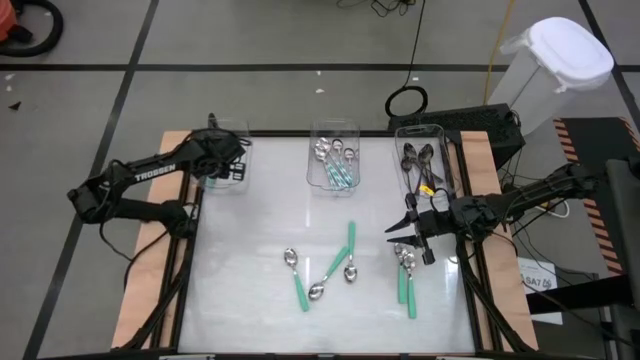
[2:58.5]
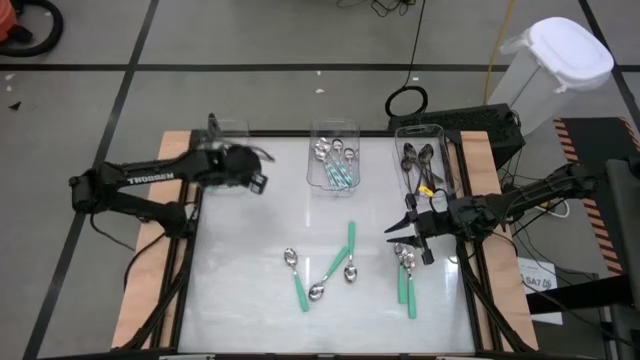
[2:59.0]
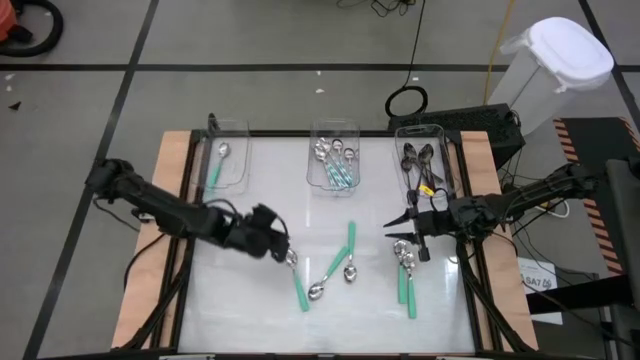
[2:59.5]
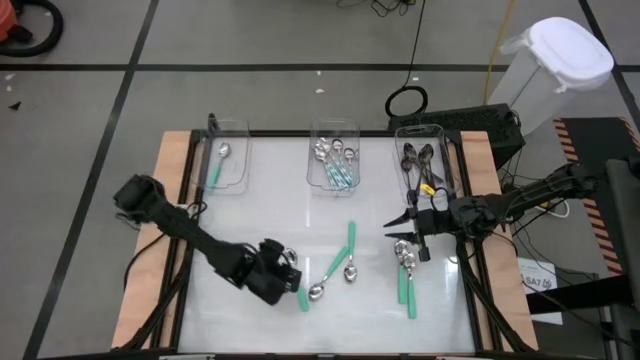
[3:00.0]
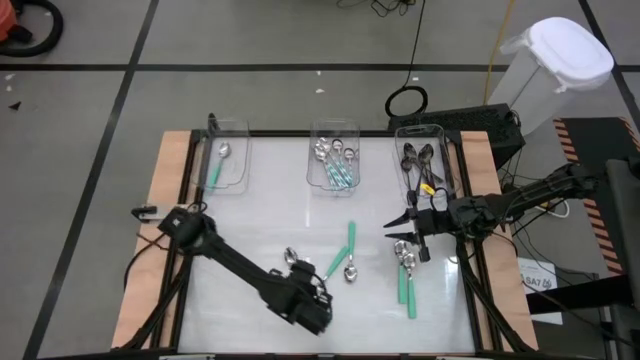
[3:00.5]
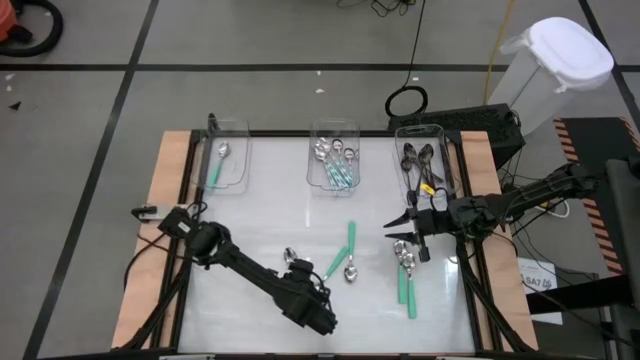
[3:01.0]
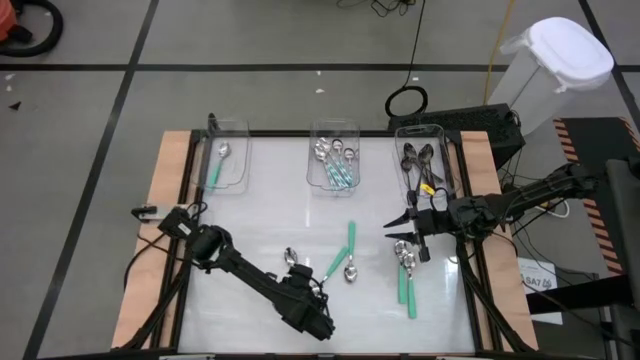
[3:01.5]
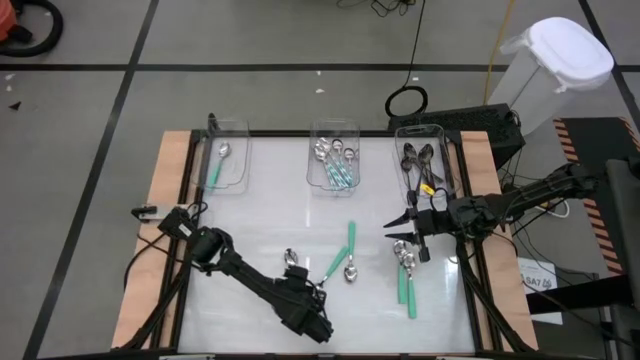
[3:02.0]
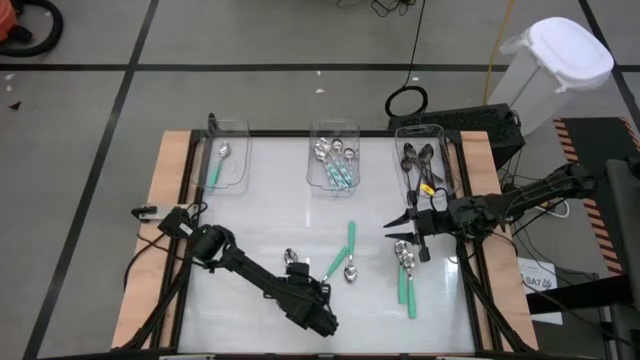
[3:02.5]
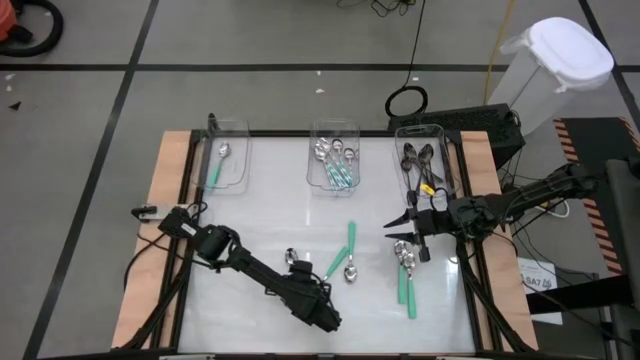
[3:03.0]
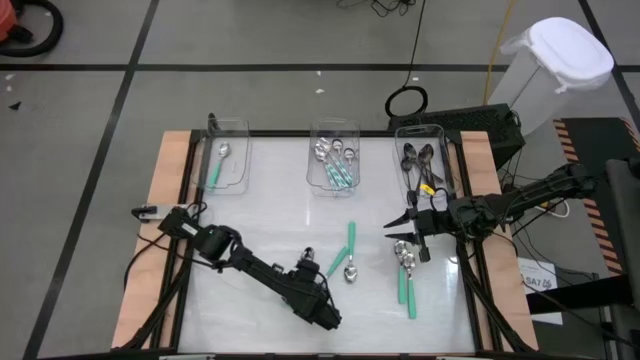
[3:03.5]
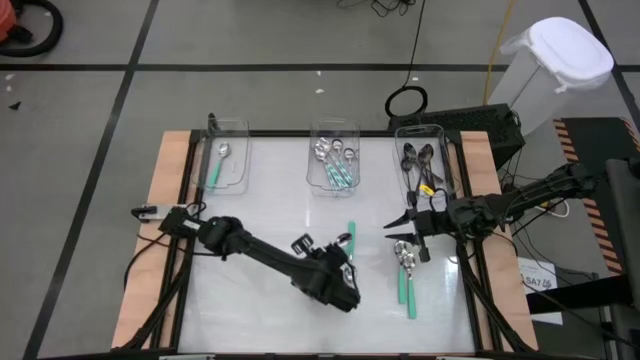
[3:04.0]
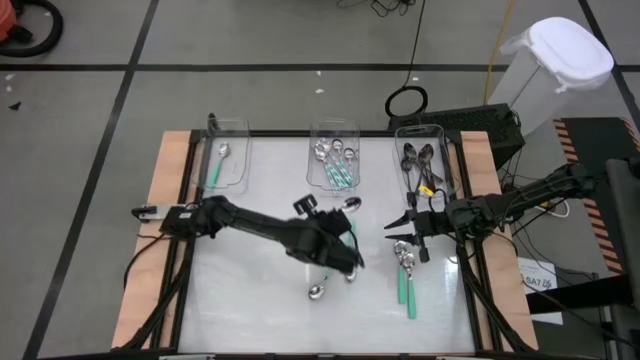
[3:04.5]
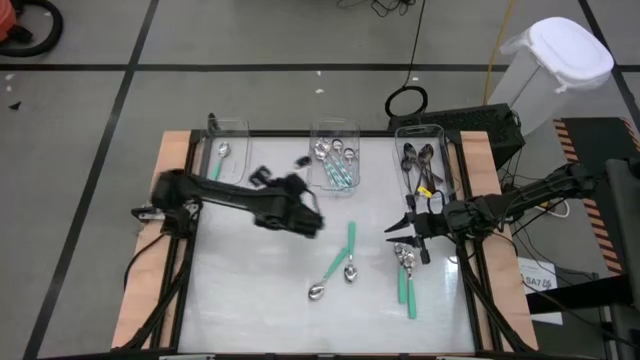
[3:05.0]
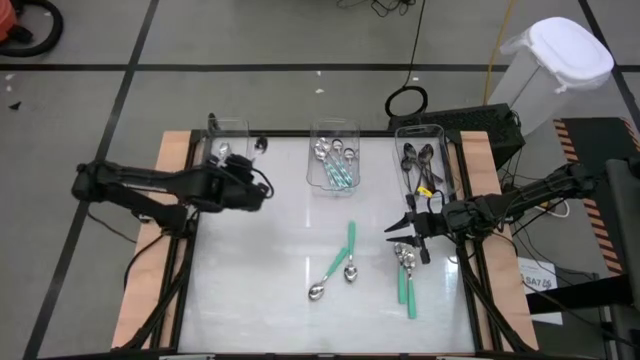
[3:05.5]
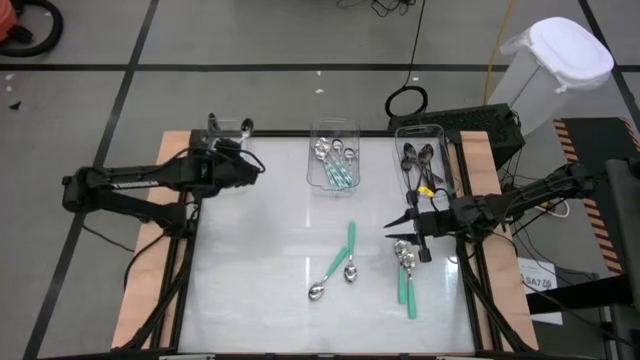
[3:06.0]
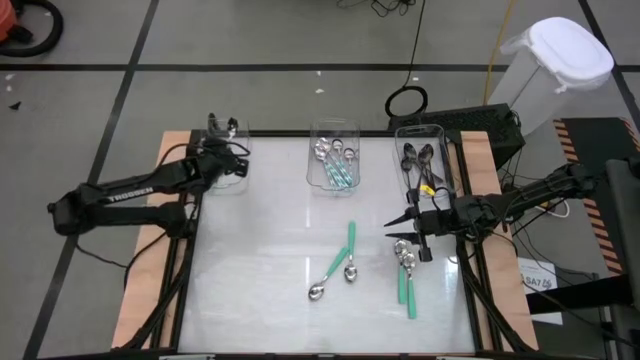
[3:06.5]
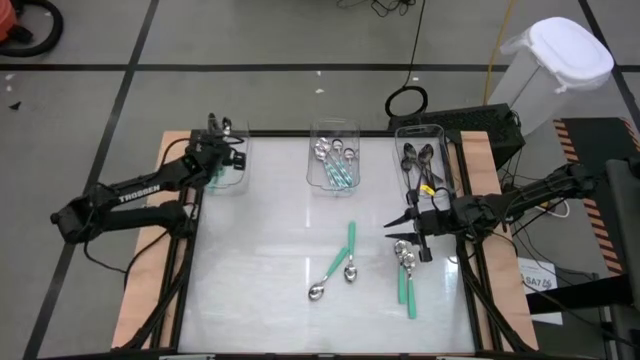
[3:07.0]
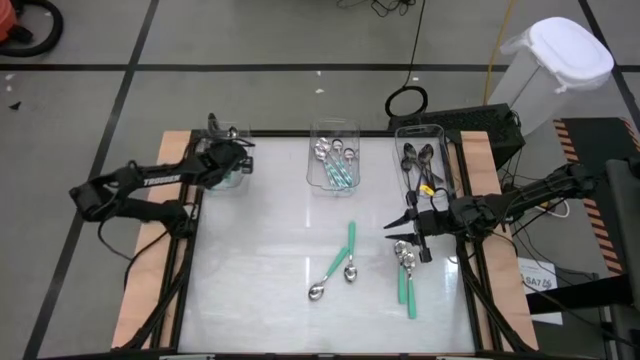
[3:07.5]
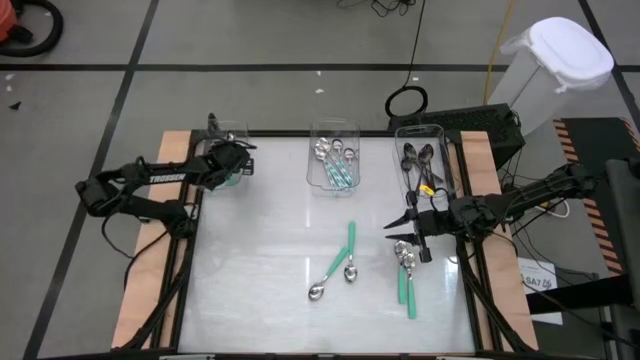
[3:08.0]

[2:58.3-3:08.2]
Task: Sort silverware by color (type)
Put the green spoon into the left transparent bin

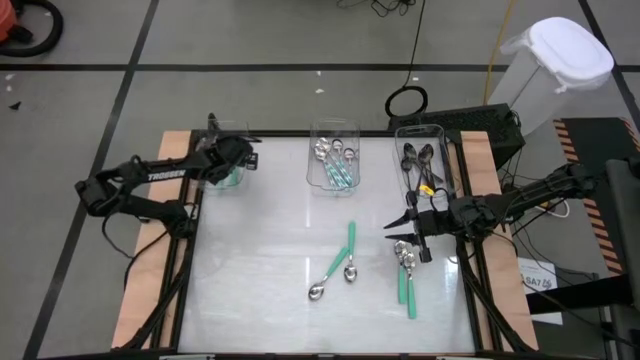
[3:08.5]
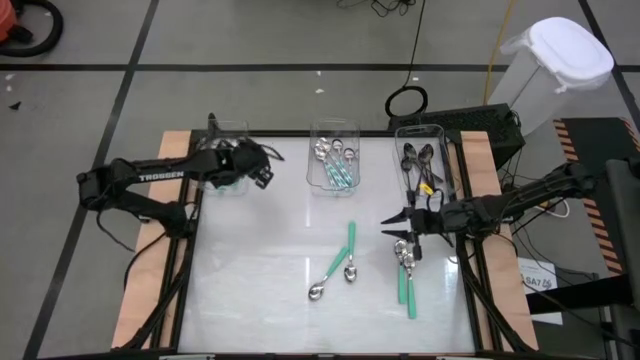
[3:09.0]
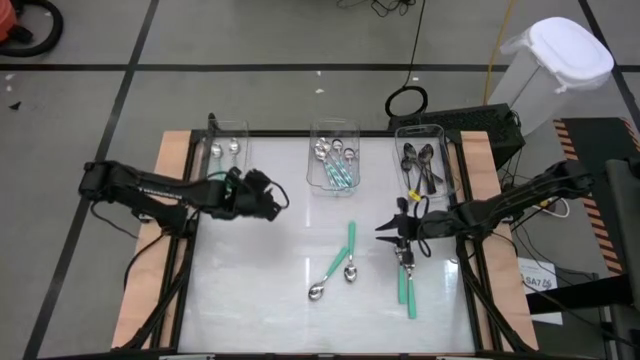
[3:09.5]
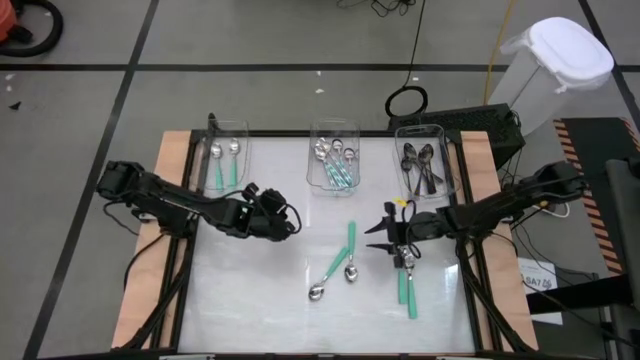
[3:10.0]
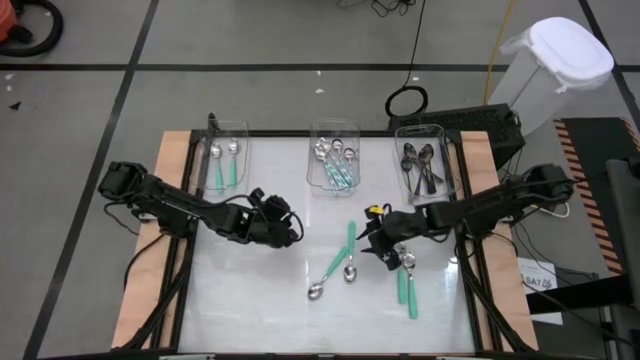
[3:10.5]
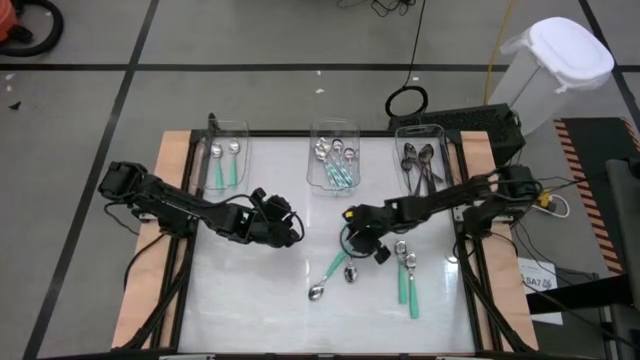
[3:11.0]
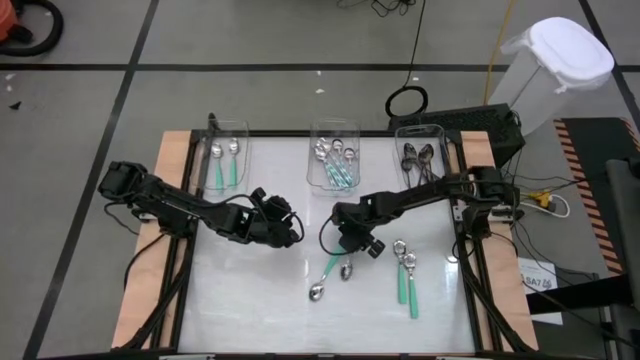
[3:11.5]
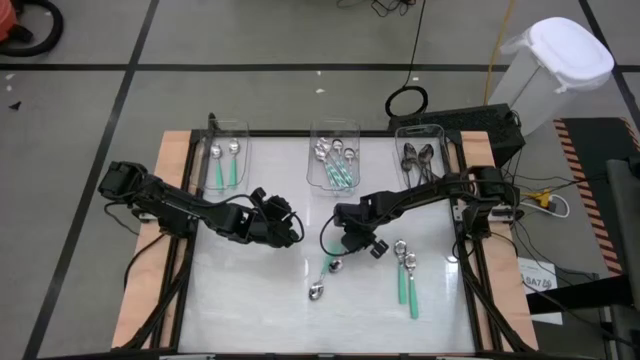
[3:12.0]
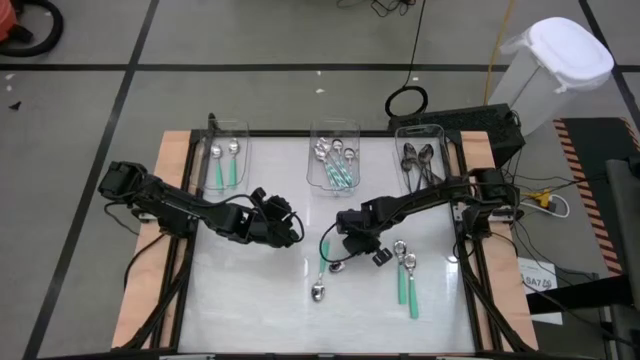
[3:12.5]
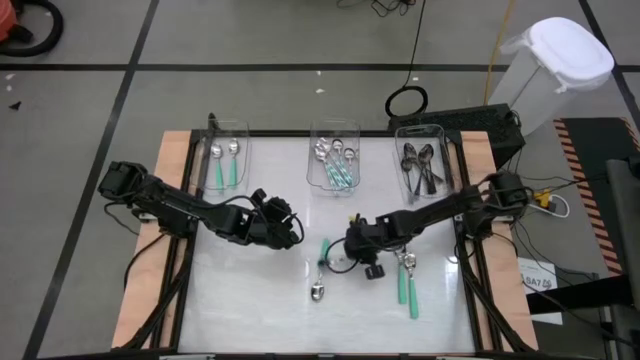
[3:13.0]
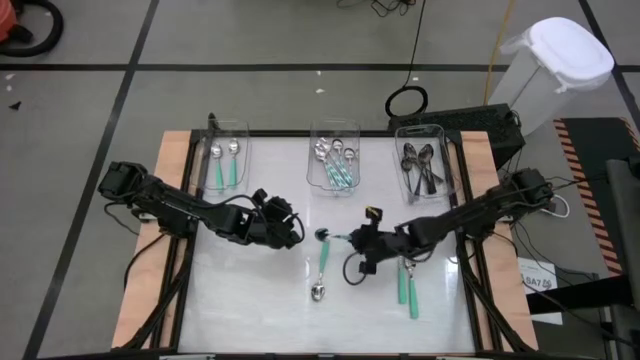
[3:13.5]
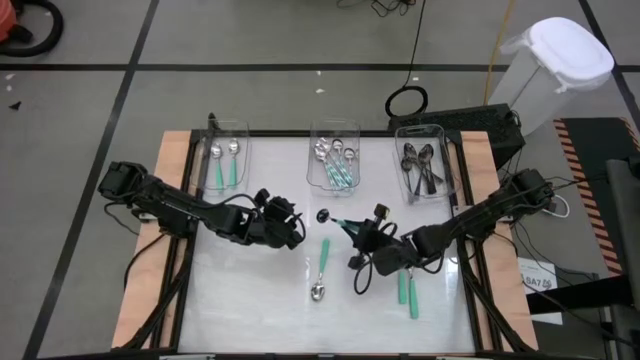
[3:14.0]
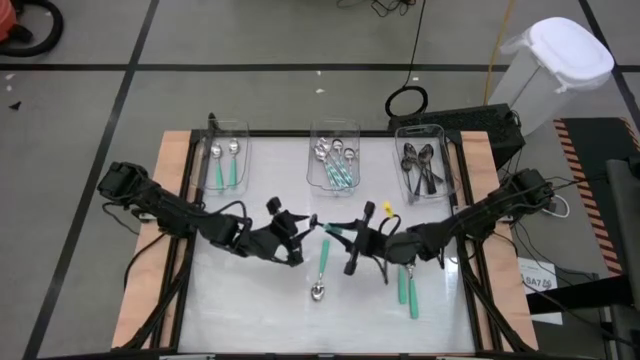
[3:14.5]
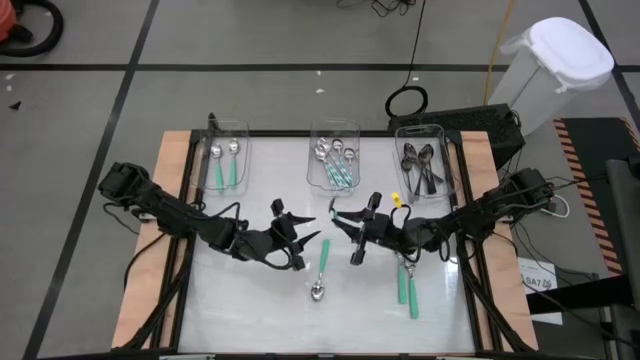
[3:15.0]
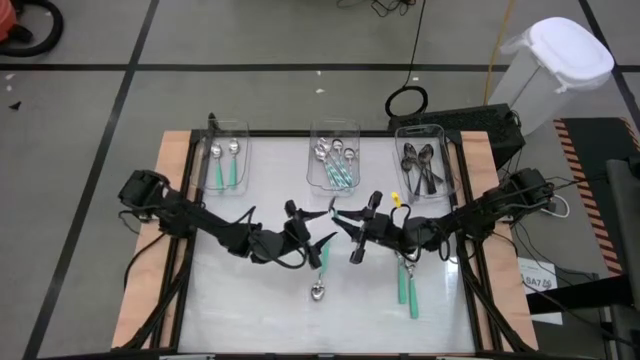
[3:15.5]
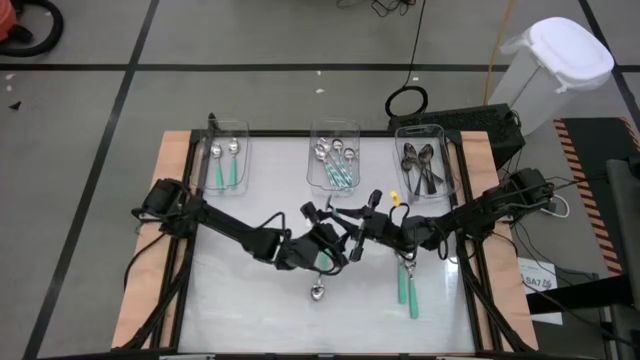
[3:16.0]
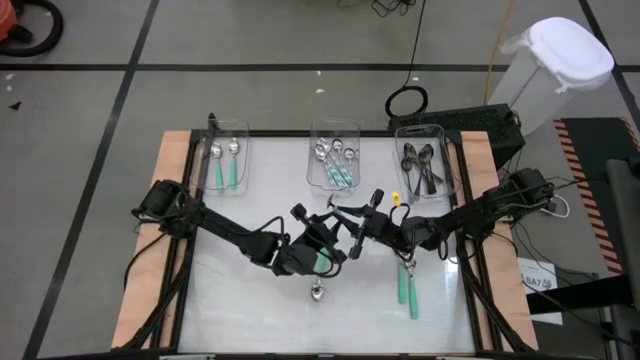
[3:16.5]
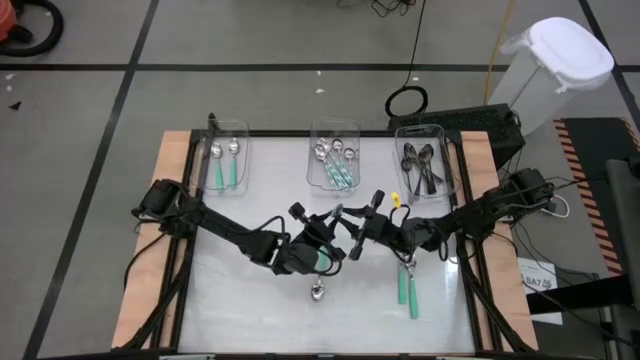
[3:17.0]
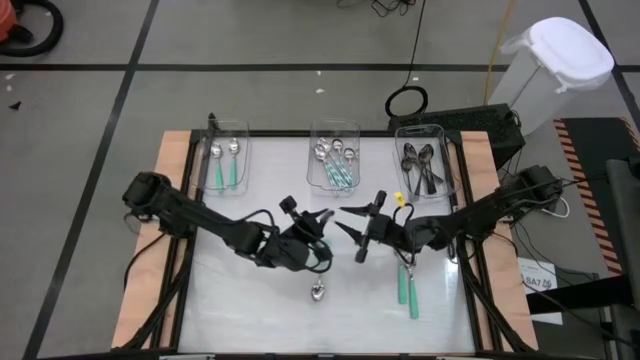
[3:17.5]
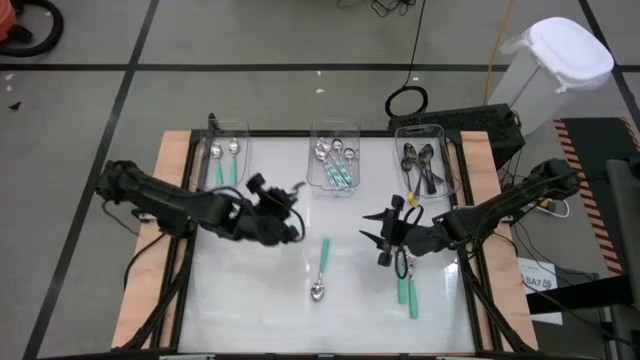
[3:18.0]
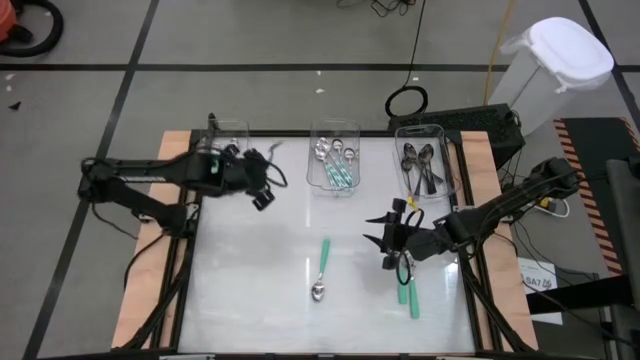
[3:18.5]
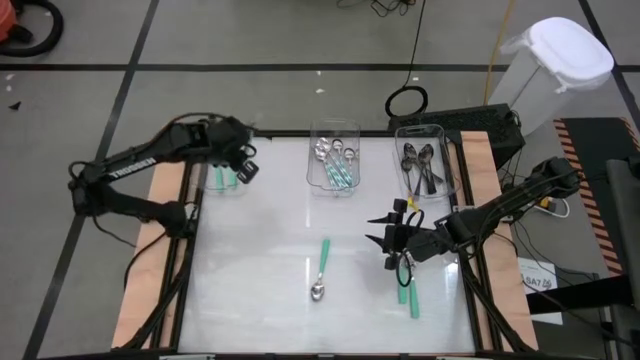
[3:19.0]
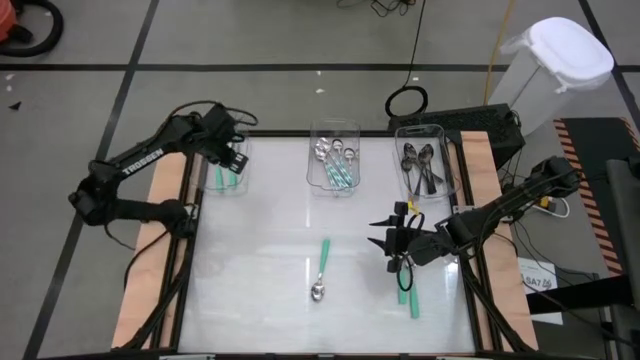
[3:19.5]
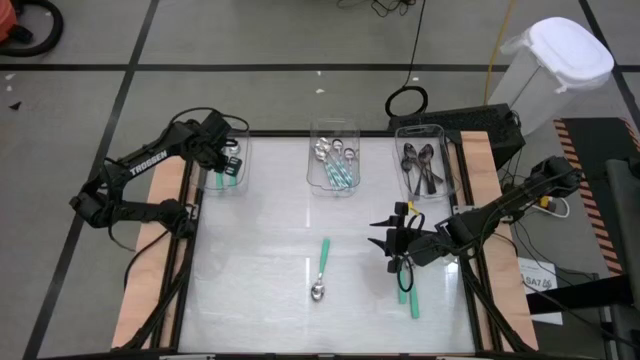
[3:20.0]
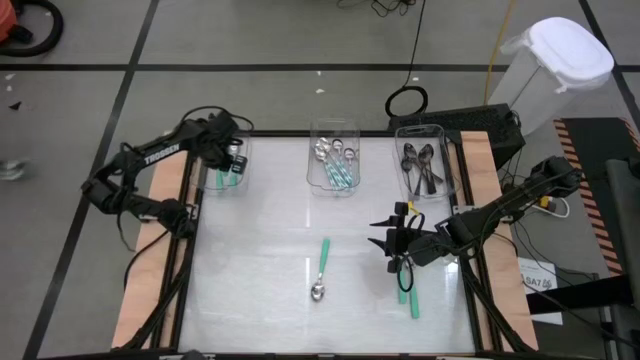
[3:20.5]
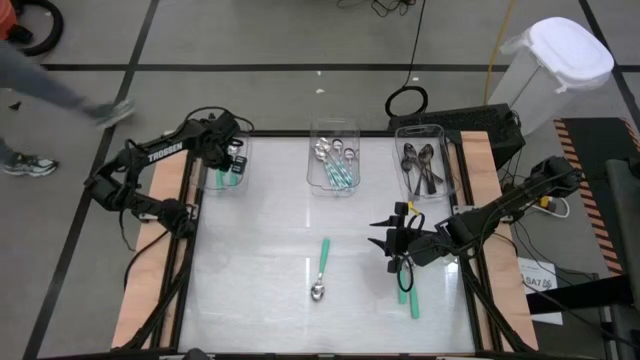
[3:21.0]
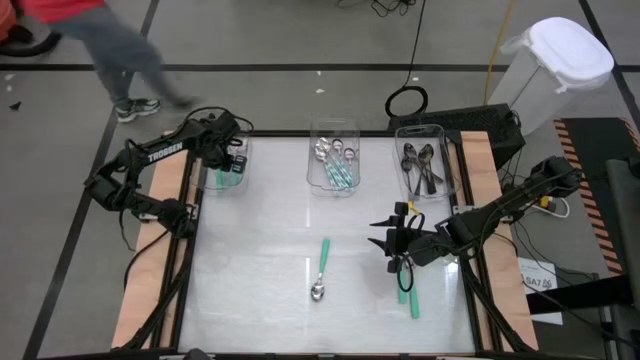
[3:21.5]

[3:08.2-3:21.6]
Put the green spoon into the left transparent bin
